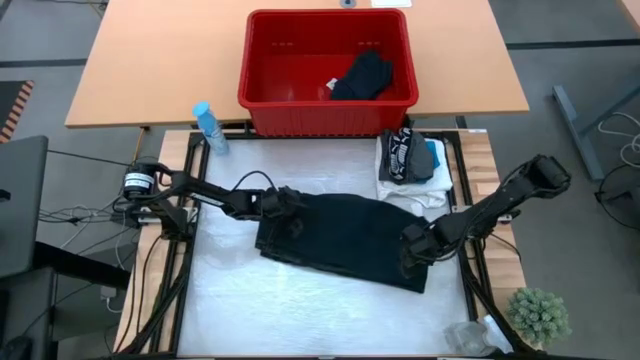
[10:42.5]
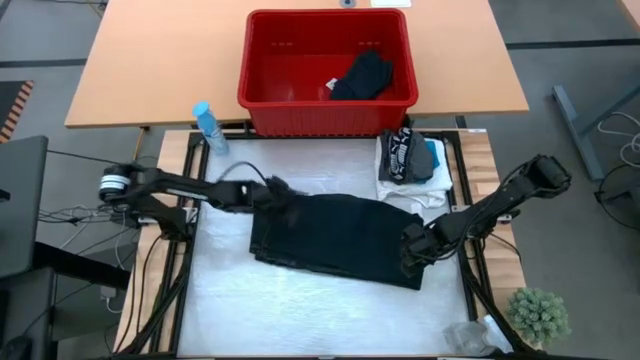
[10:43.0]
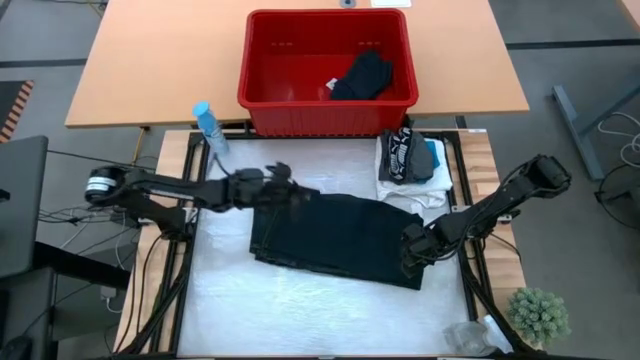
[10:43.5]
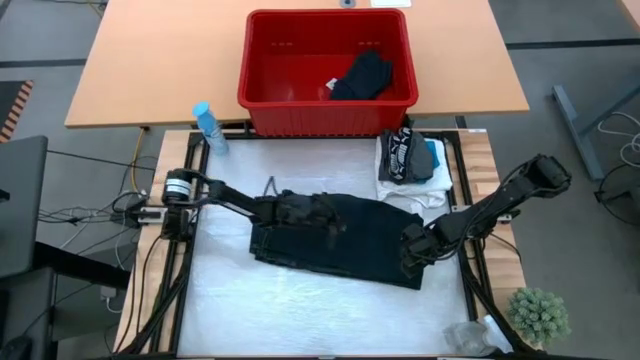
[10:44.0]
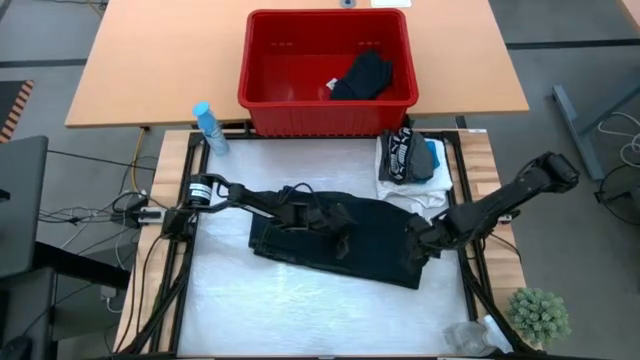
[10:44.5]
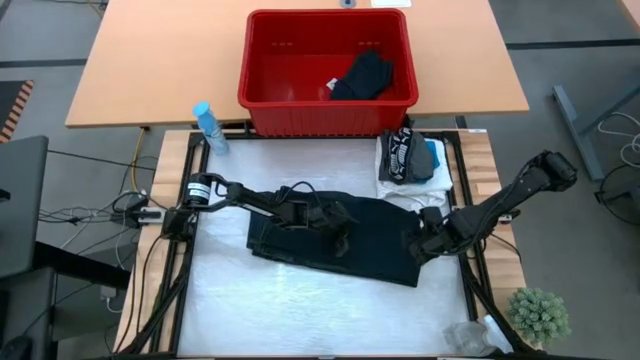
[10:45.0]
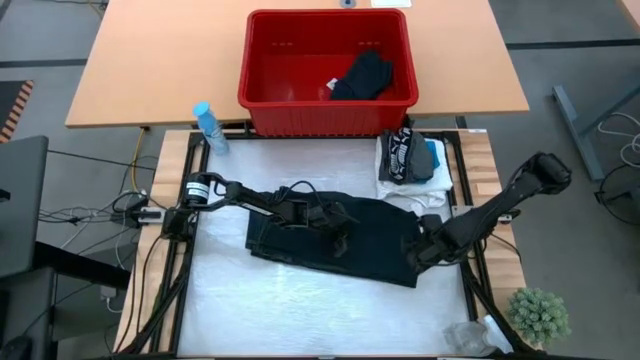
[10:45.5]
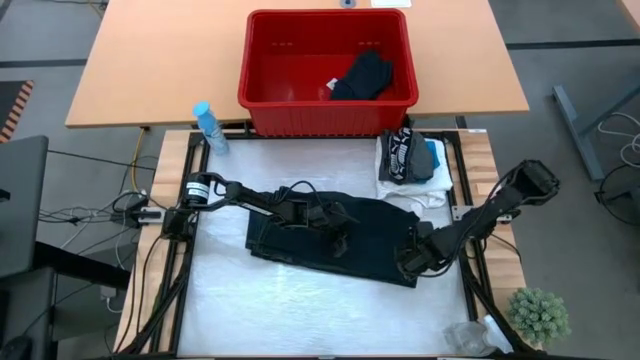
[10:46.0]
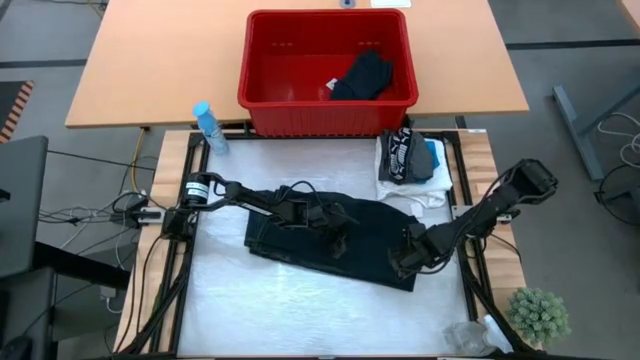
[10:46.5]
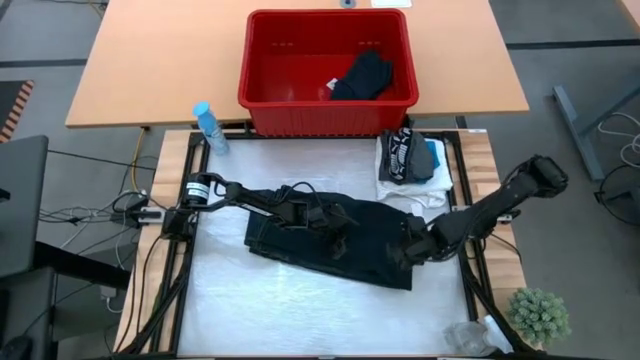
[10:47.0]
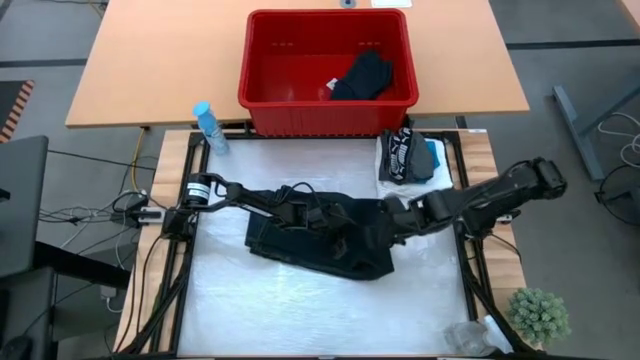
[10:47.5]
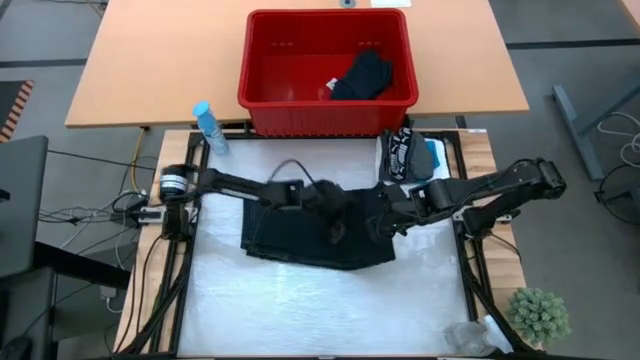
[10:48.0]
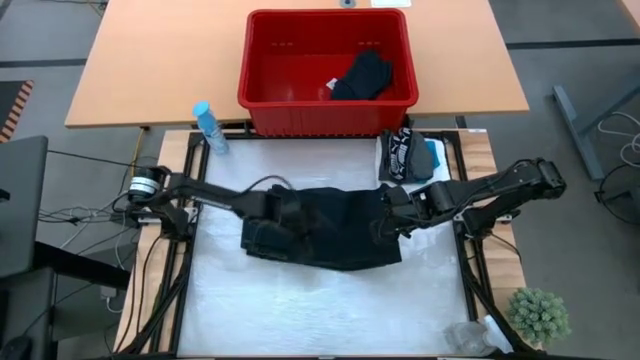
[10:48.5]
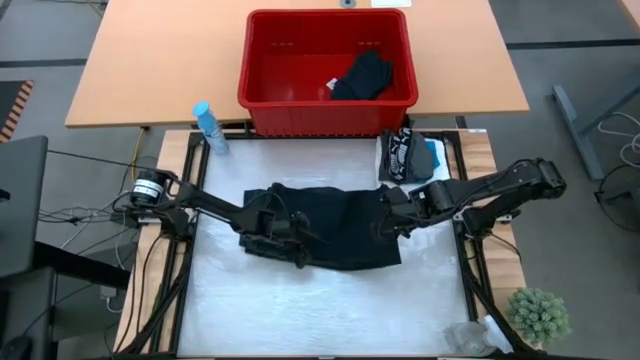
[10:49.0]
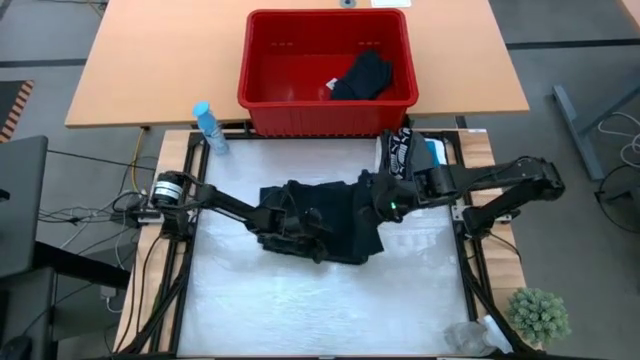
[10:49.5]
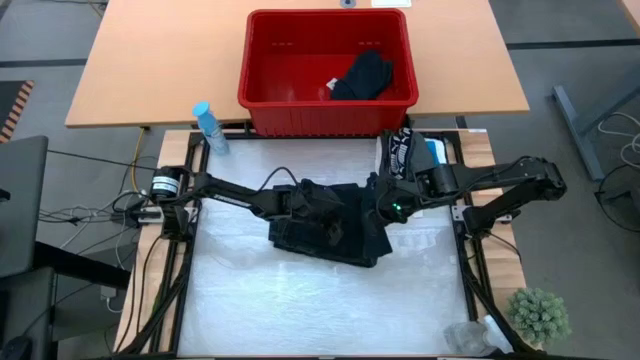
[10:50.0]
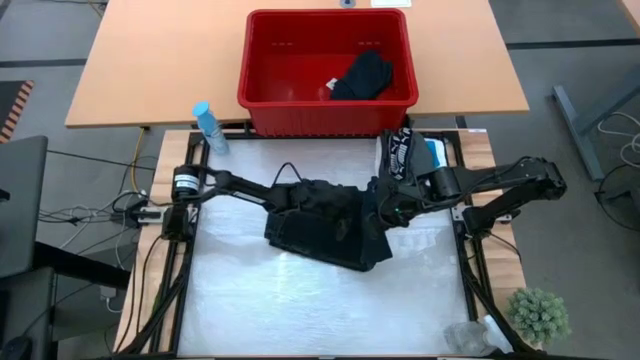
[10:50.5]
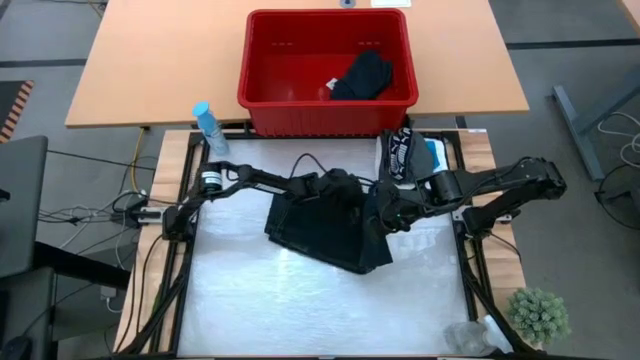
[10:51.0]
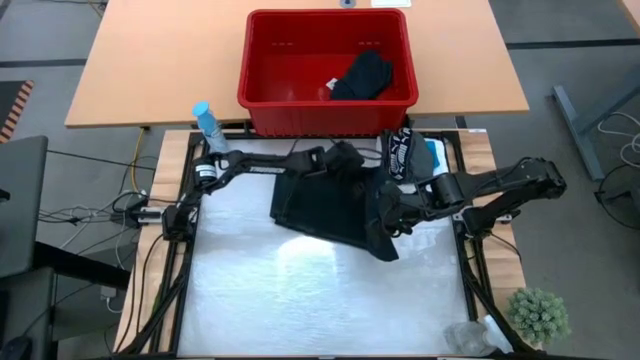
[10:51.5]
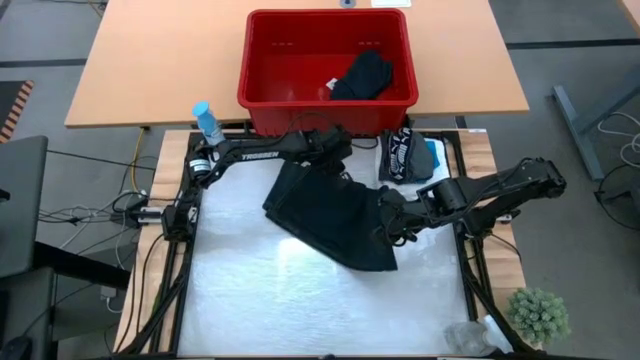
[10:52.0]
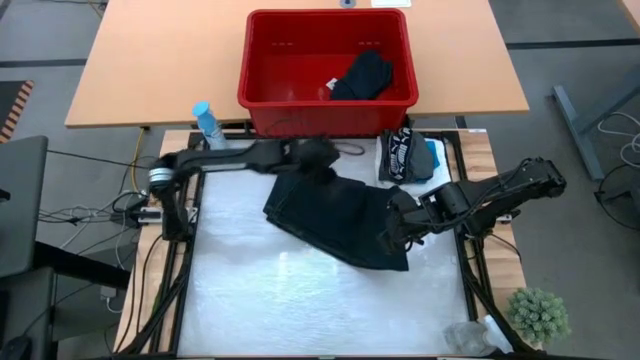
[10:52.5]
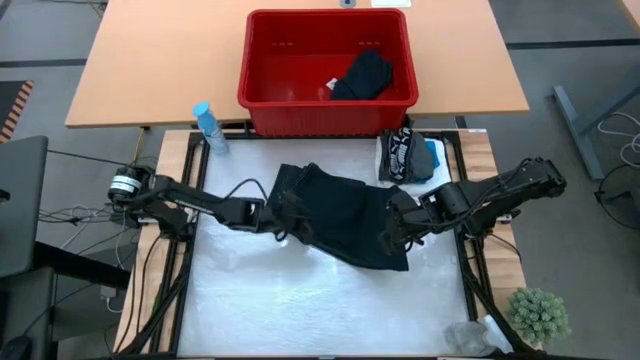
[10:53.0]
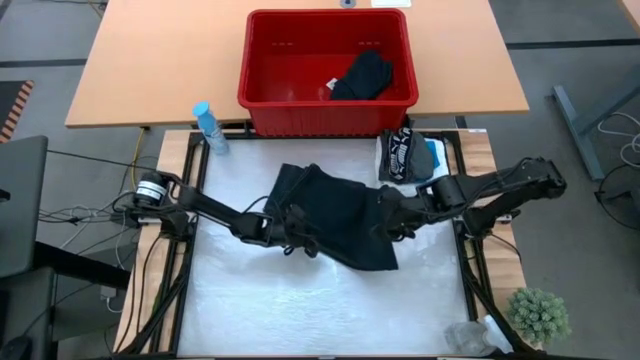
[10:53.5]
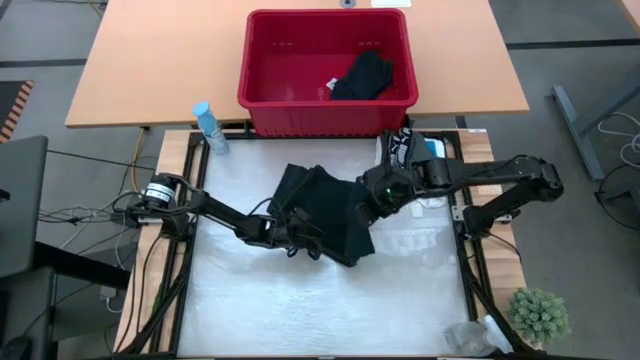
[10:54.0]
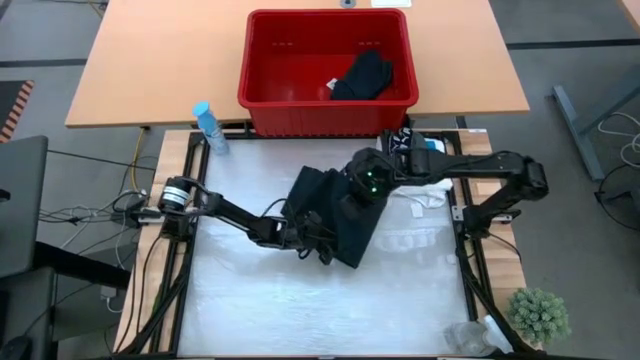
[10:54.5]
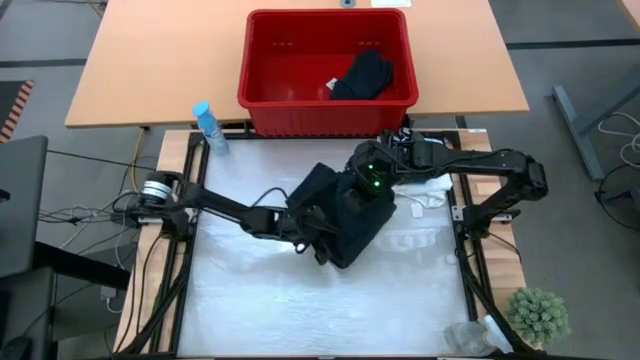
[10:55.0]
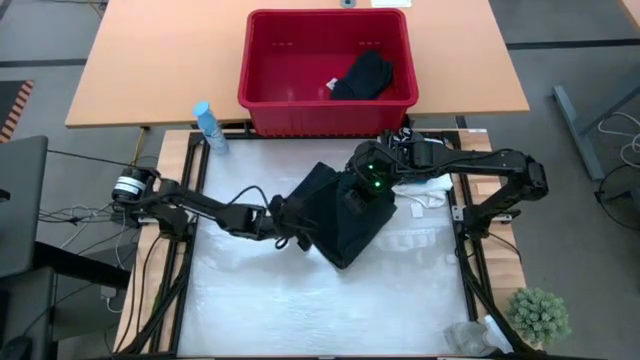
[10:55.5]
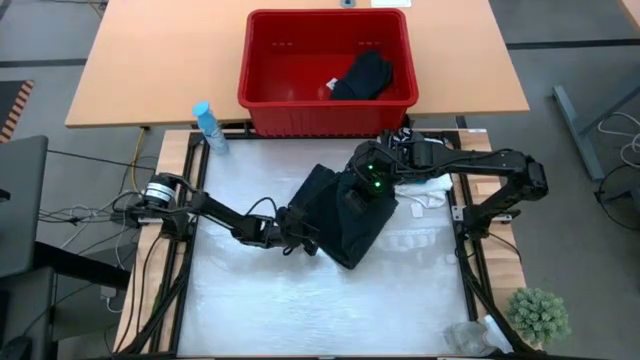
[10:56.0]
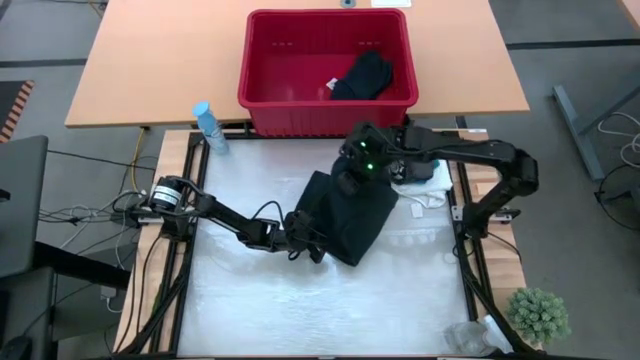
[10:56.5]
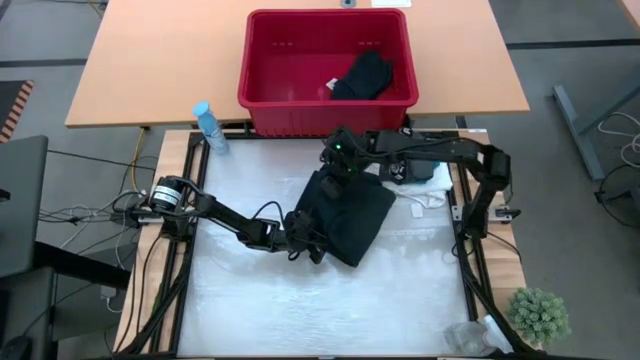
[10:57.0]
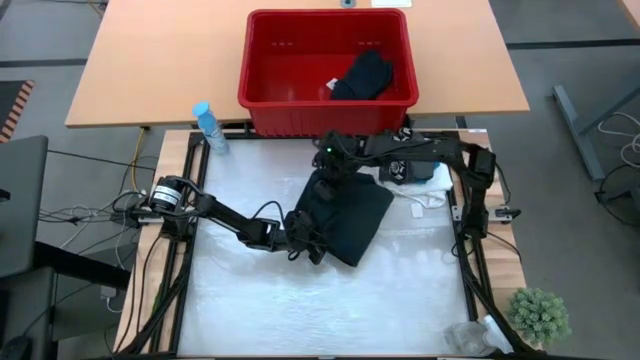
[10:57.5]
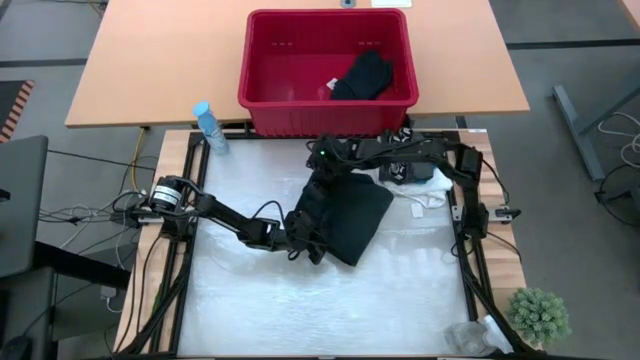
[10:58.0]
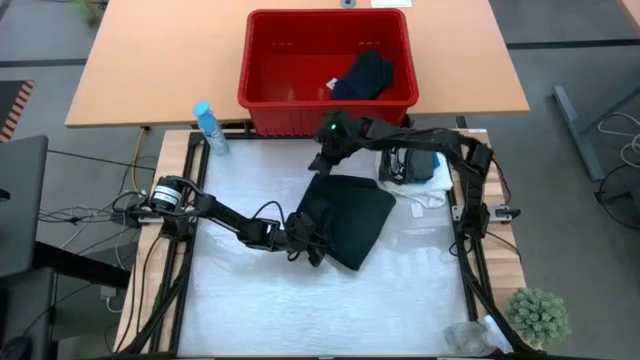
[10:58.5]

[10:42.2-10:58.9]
Task: Fold laundry
Fold the blue pants

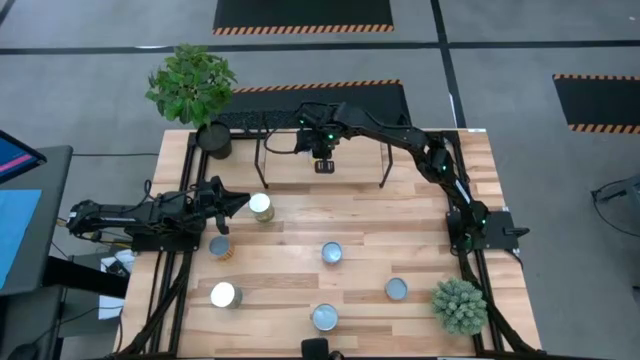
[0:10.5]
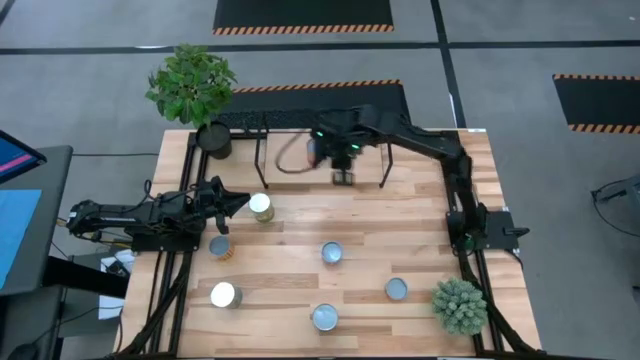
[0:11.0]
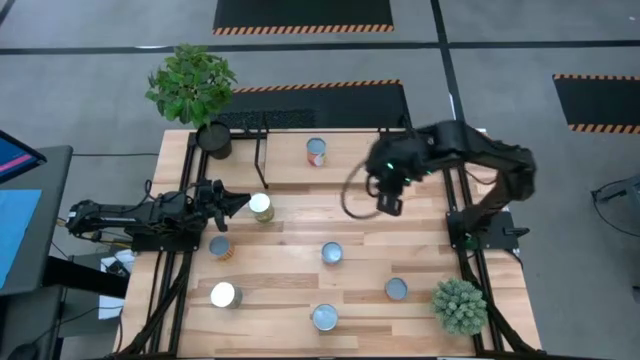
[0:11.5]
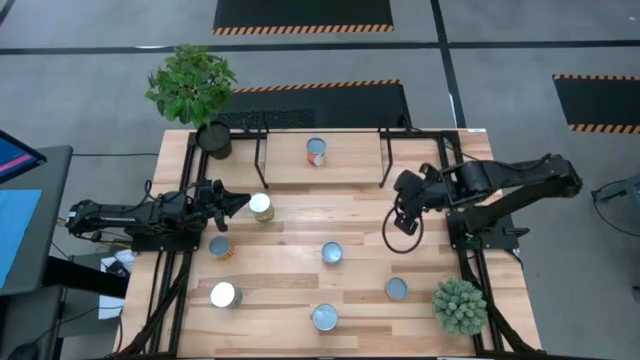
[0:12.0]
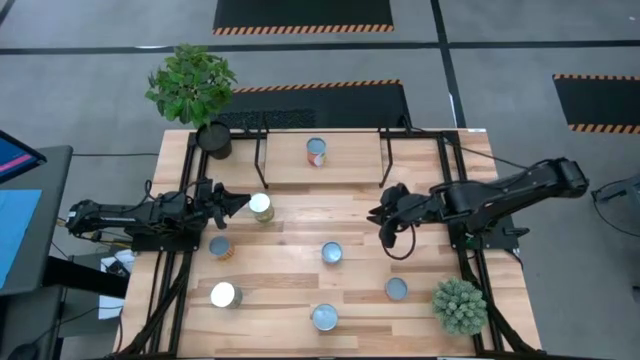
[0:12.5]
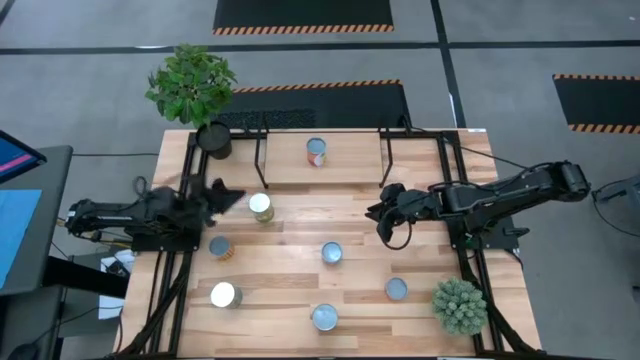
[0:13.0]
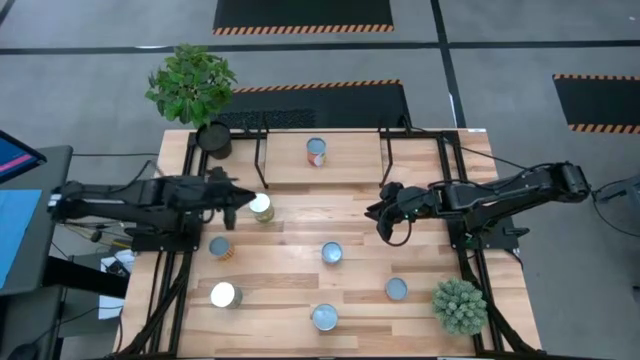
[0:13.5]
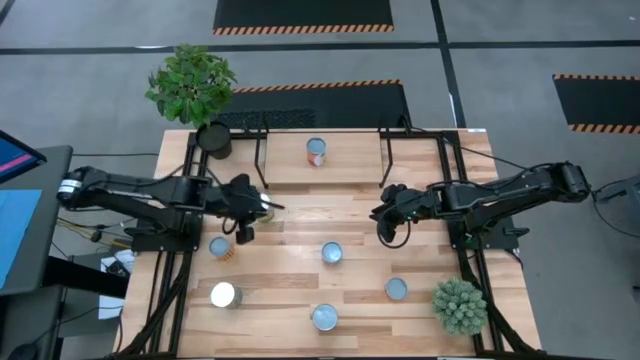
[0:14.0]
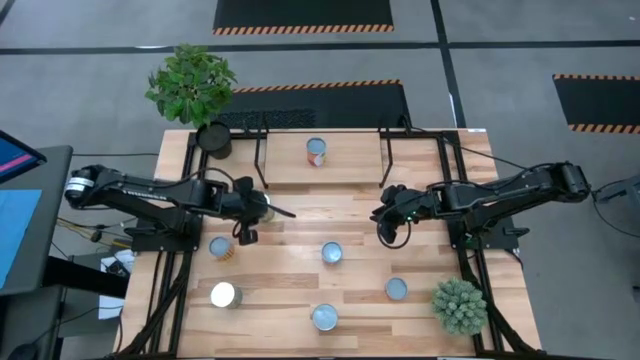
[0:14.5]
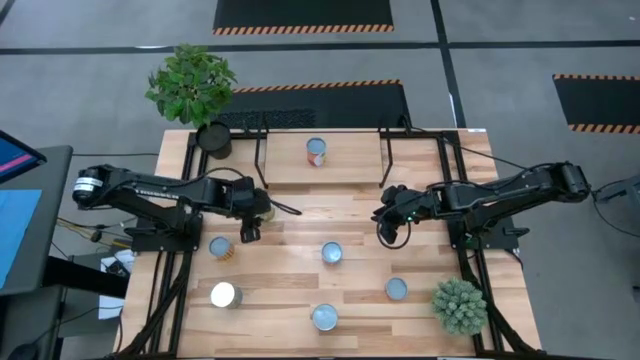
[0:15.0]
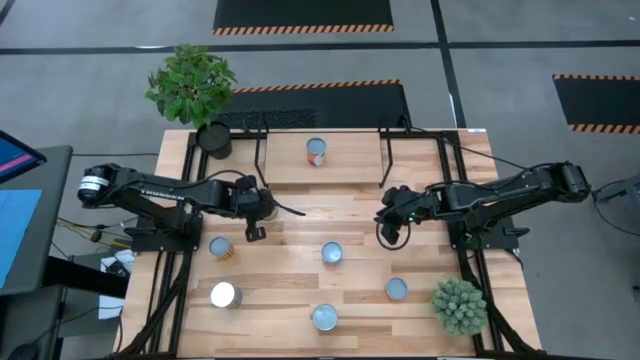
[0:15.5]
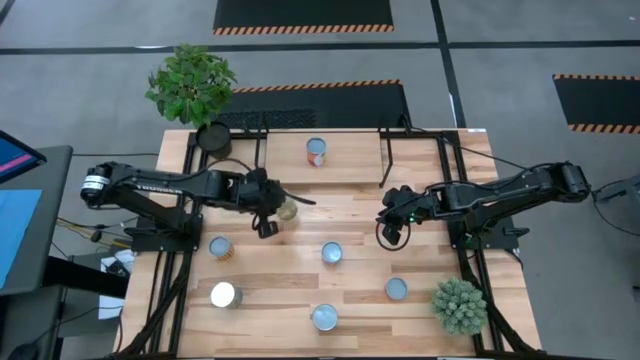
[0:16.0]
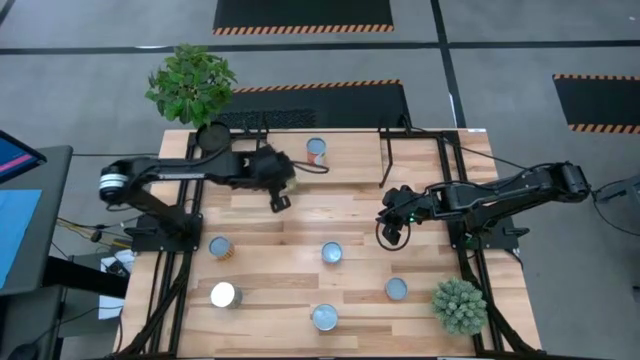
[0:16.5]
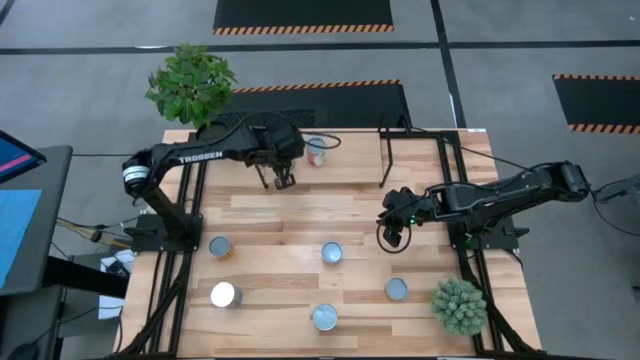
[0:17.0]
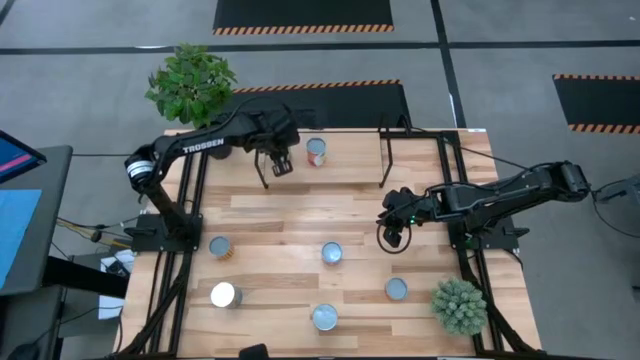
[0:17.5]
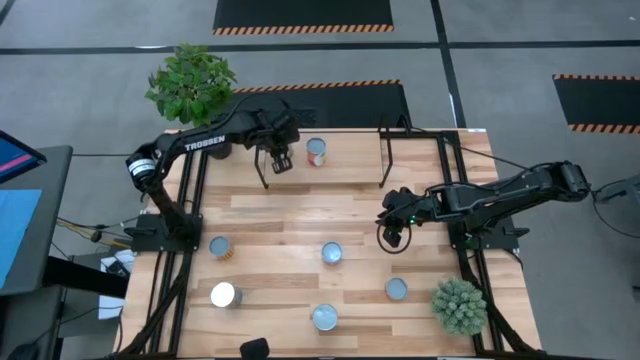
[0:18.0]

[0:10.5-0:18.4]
Task: Pick and place cans onto a shelf
Put the canned pears on the shelf
